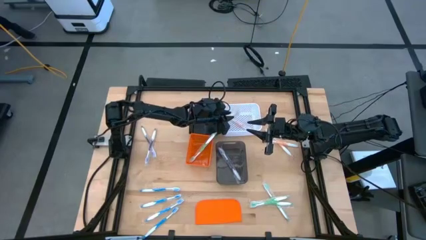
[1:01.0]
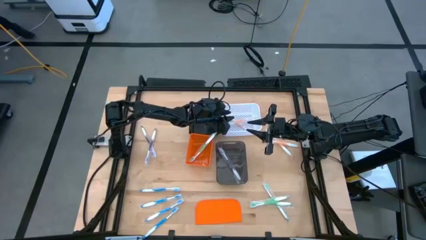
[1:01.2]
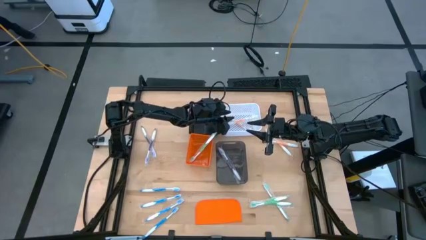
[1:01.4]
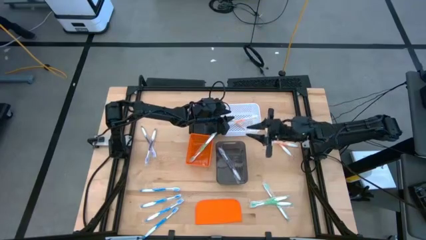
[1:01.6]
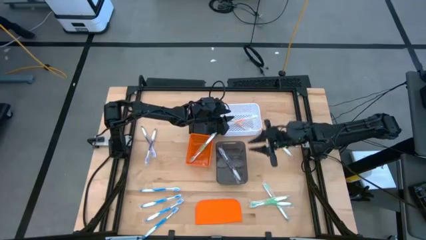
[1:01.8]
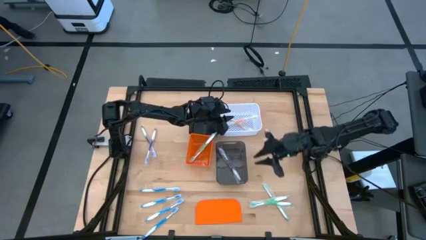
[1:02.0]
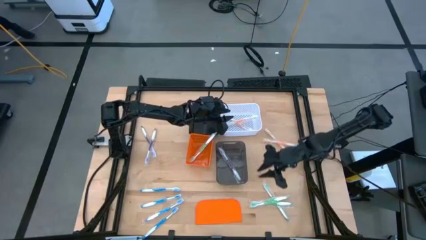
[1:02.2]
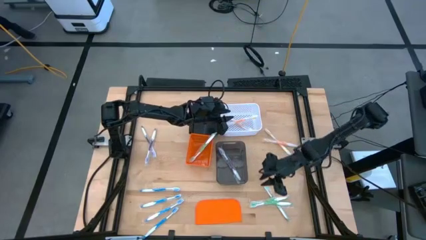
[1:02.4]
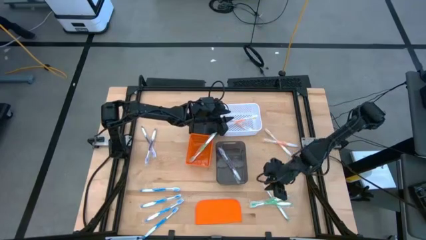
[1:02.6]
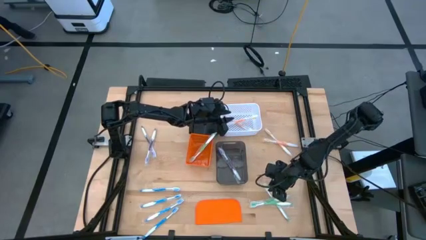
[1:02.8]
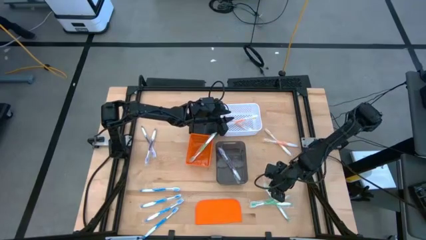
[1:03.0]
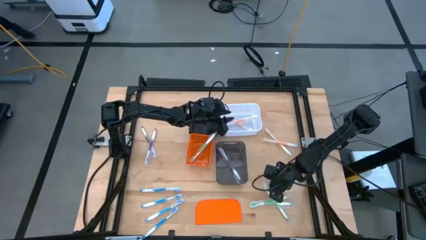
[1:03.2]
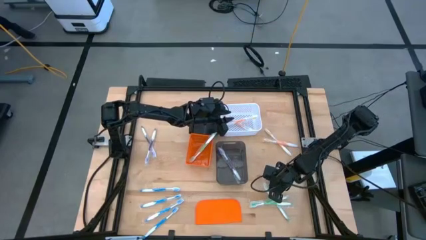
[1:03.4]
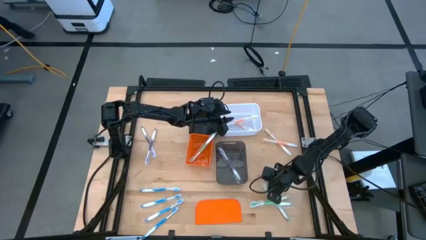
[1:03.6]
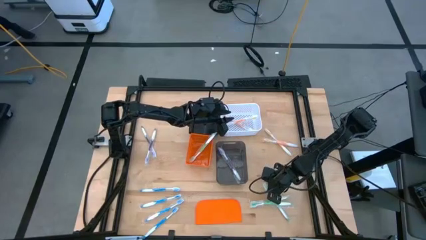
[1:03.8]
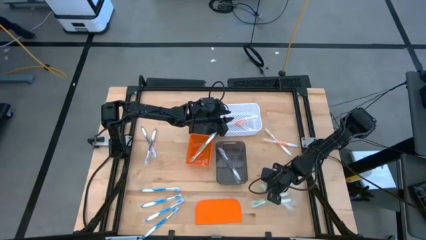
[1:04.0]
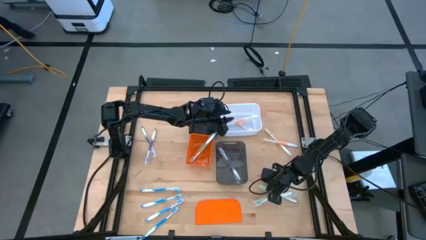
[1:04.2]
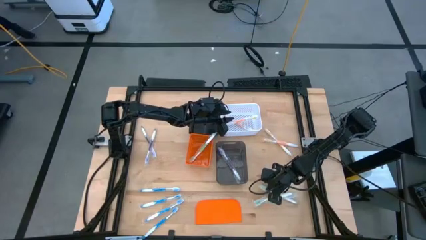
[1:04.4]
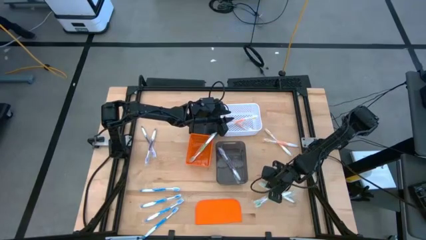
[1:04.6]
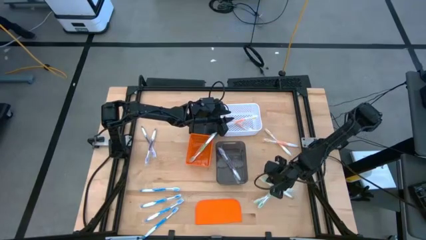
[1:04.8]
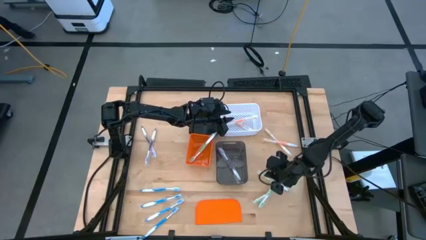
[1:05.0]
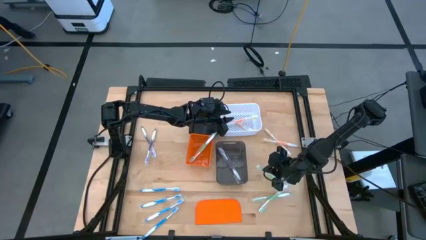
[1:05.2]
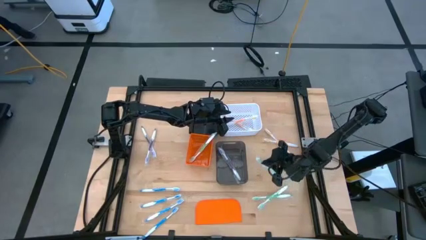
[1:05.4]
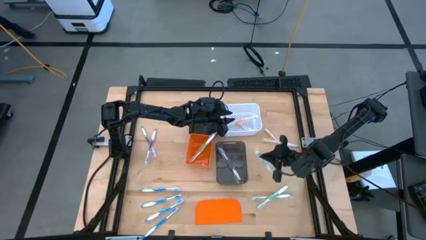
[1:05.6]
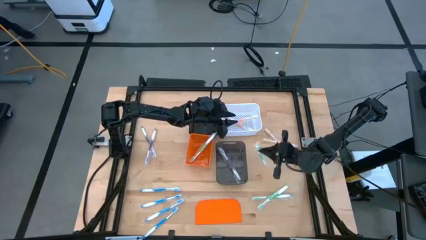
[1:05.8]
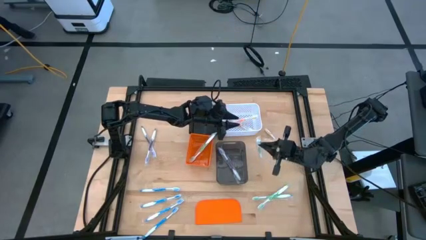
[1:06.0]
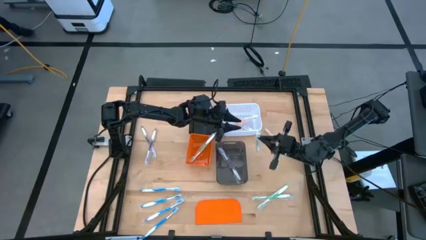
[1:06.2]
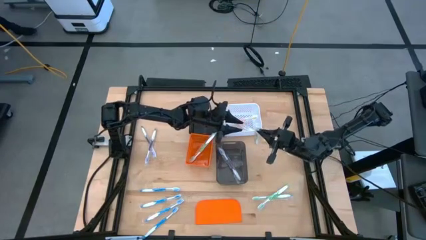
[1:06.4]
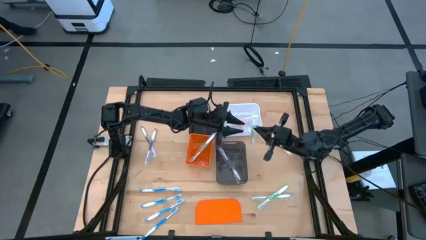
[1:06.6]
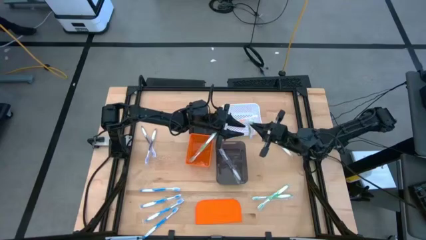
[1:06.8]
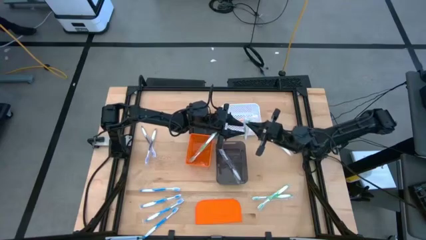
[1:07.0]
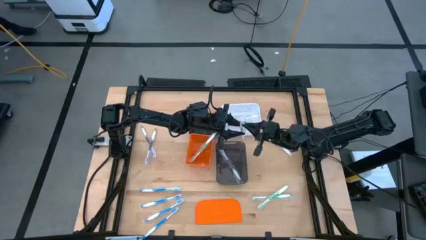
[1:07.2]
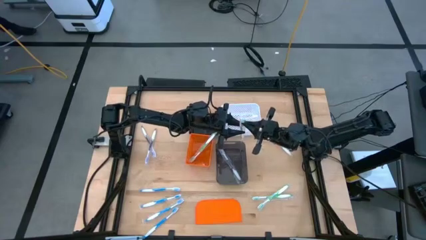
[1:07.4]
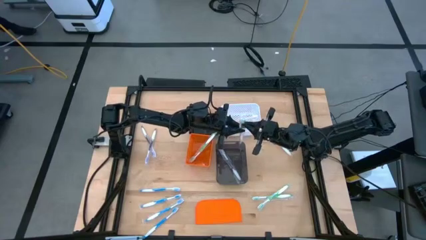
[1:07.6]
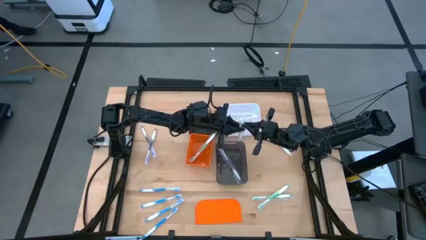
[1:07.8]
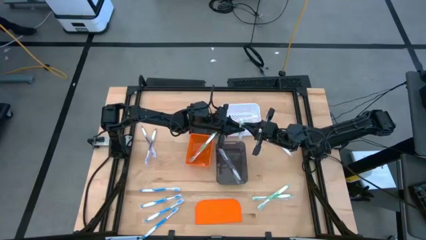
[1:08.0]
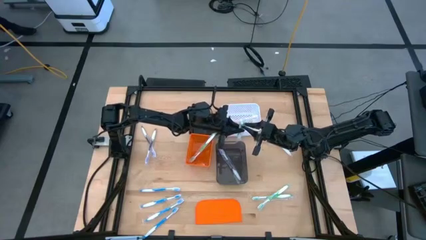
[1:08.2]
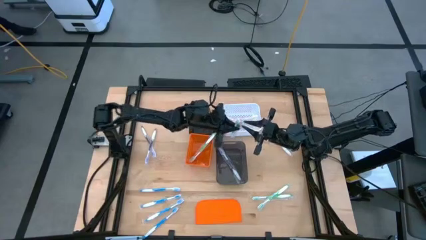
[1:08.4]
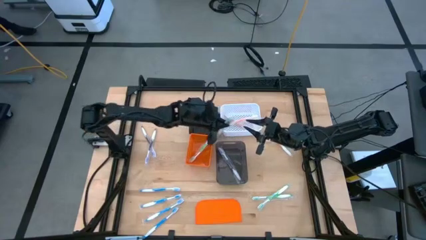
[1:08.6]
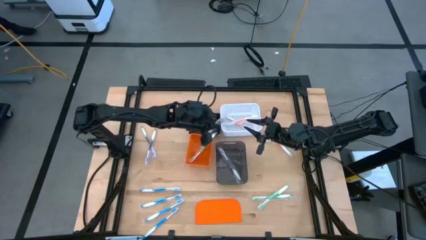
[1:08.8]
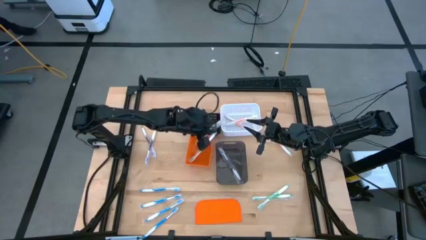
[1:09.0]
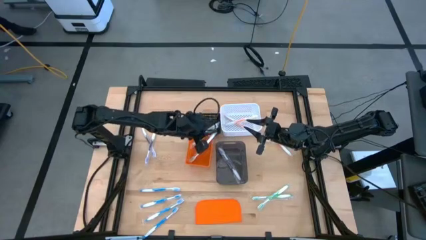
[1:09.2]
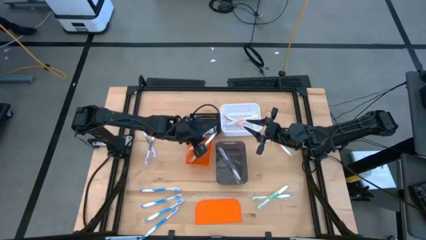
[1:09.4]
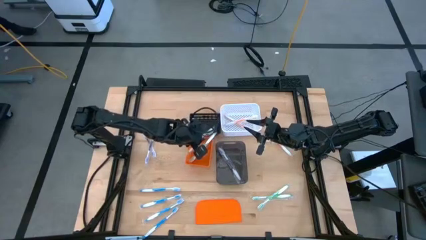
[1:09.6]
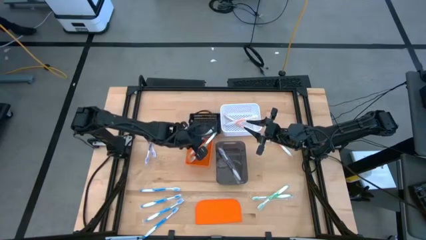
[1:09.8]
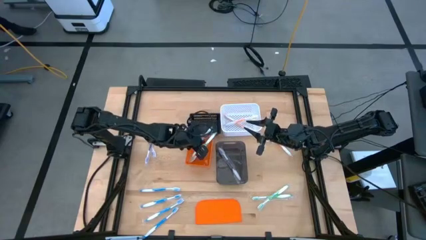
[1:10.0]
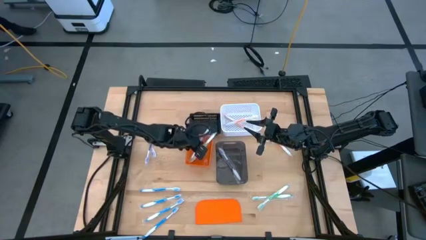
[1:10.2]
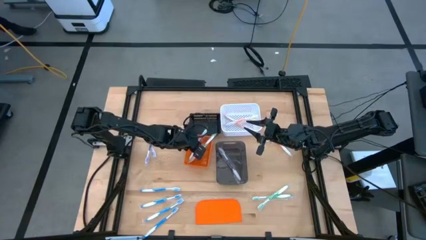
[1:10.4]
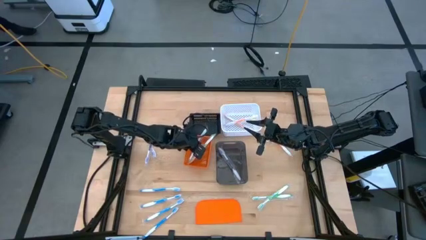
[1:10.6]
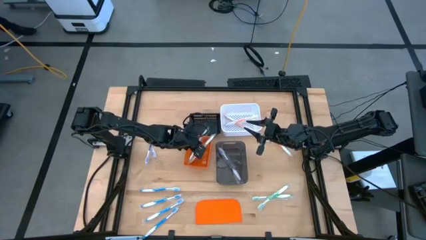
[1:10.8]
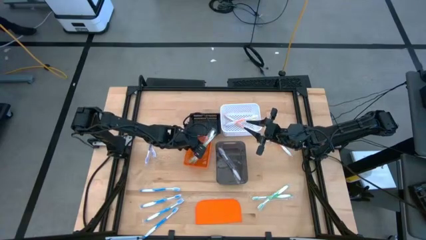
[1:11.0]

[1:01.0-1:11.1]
Task: Pick & Place Toothbrushes
Put the green toothbrush into the orange bin

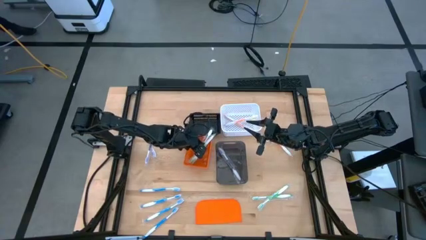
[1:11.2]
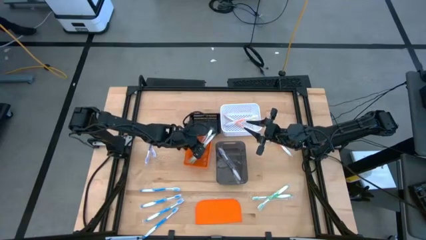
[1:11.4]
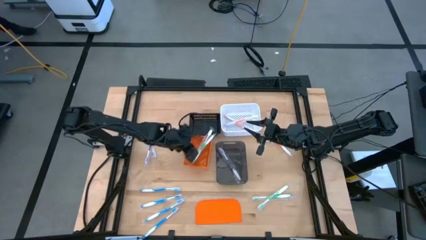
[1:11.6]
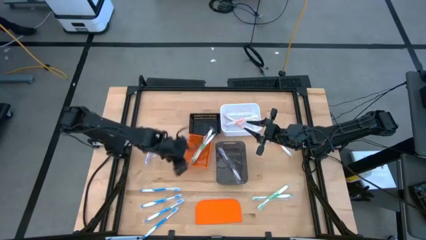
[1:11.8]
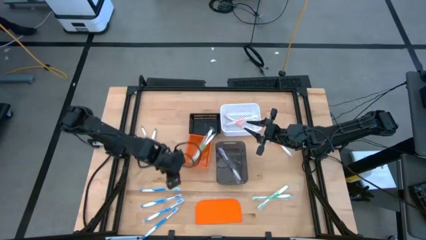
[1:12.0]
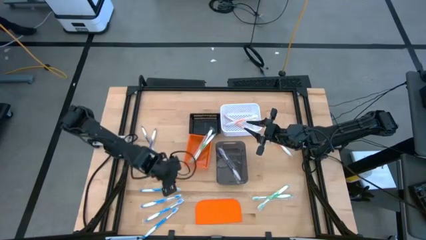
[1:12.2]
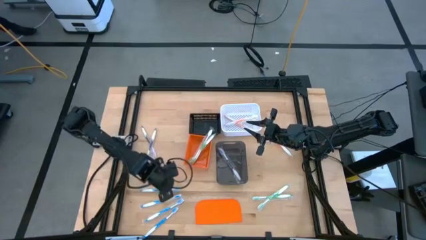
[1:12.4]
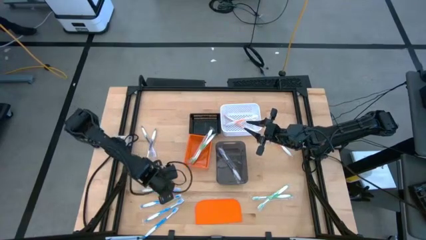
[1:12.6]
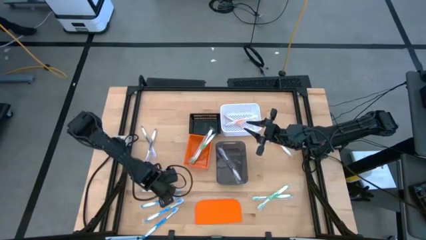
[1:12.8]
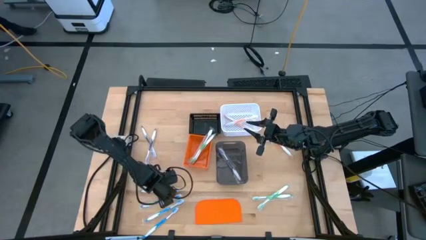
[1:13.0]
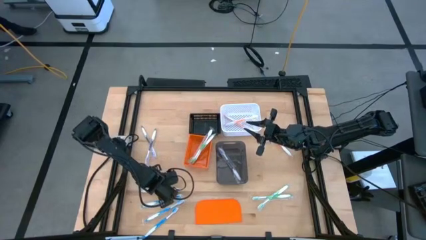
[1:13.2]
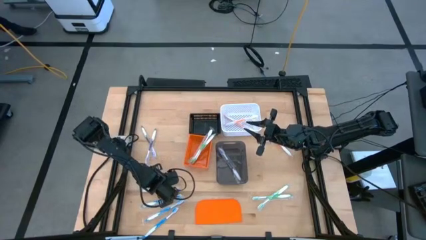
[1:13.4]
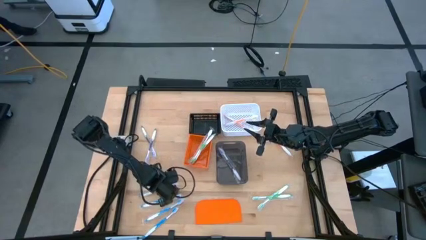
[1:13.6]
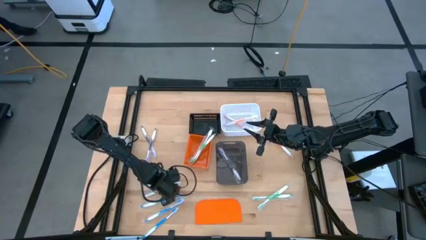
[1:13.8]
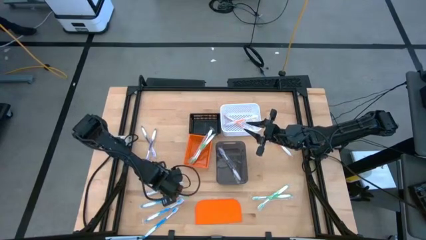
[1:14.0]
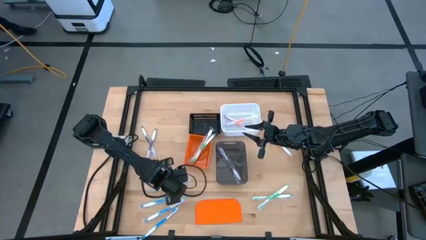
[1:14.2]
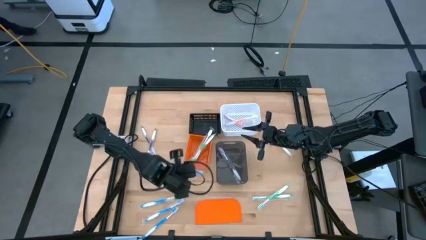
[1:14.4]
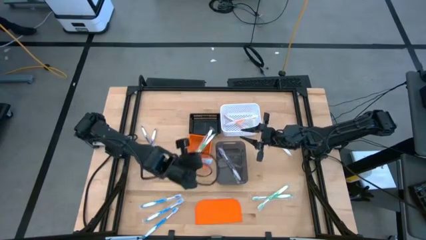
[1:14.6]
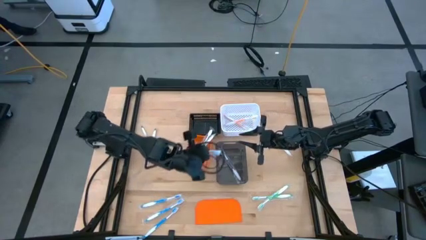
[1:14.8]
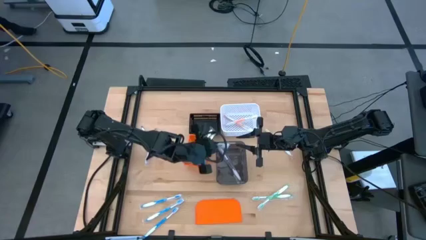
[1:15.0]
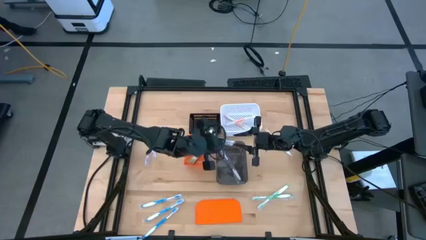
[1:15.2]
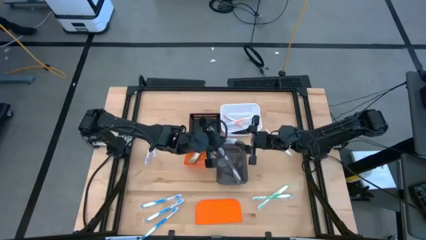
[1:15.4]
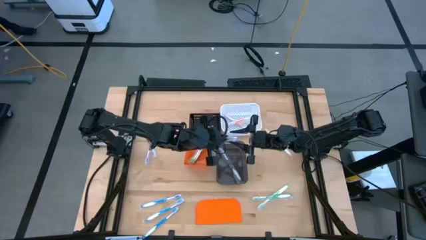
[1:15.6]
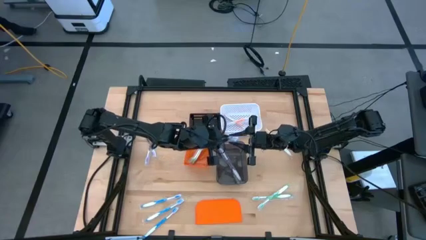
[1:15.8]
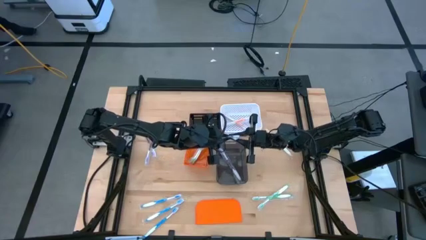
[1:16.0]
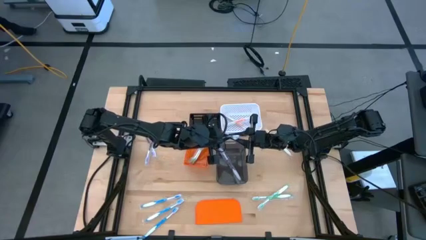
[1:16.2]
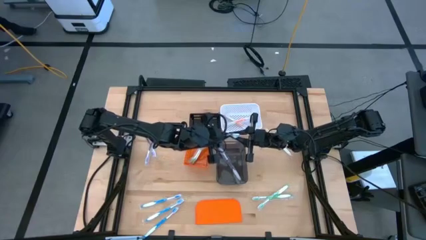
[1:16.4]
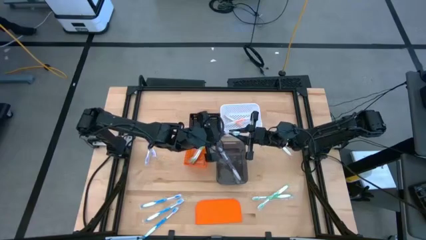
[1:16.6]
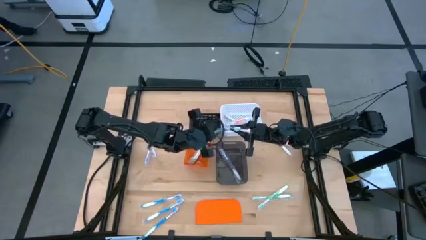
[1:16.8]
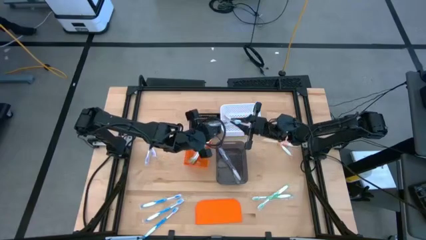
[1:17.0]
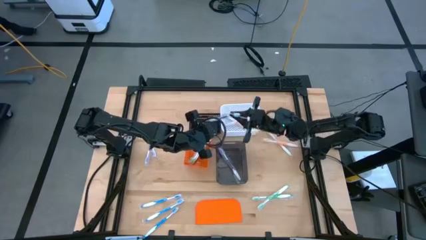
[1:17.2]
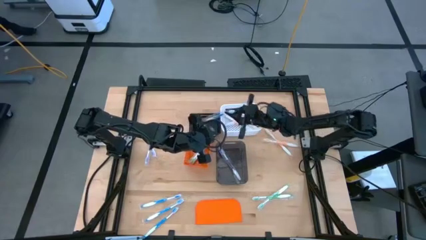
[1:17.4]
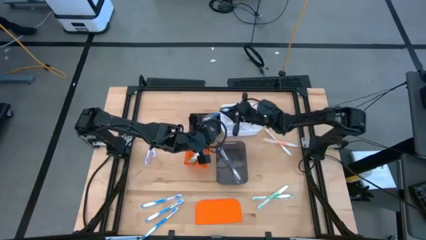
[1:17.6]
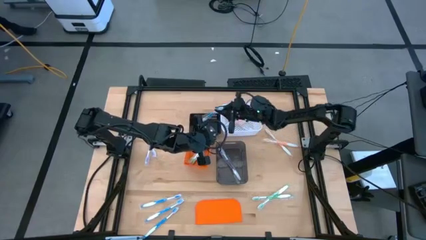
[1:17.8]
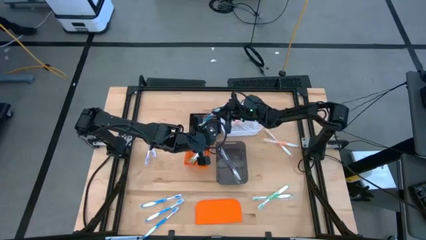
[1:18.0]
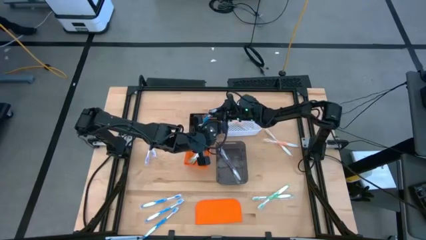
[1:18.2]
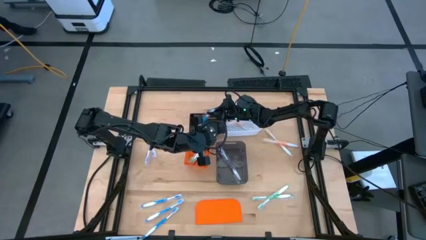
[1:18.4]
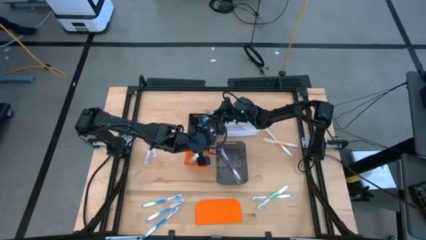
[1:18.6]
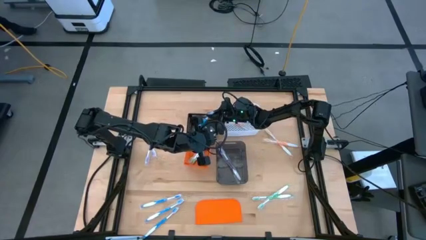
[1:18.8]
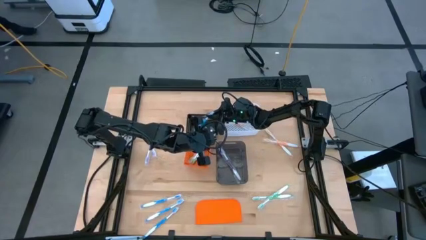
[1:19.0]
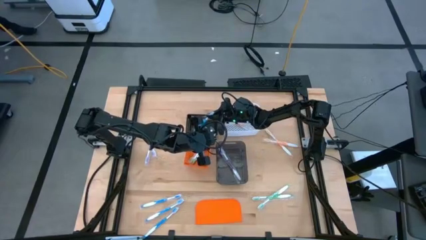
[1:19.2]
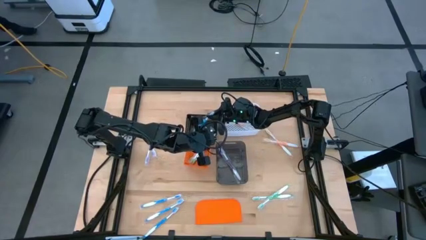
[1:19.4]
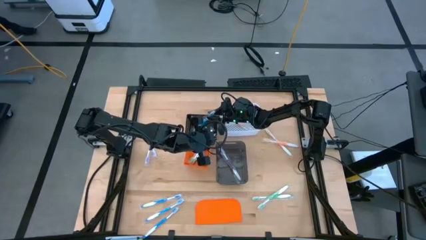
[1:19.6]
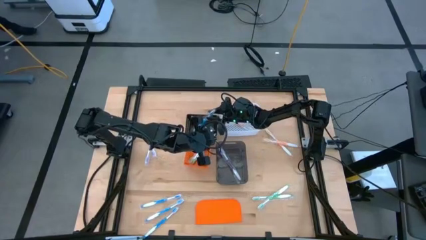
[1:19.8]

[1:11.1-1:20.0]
Put the blue toothbrush into the black bin
